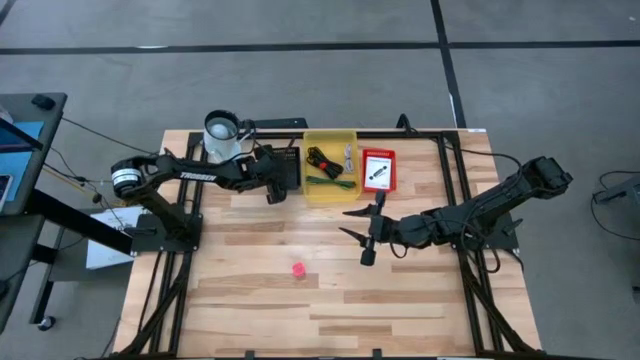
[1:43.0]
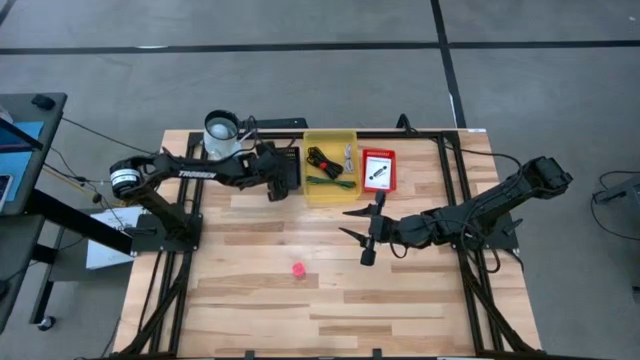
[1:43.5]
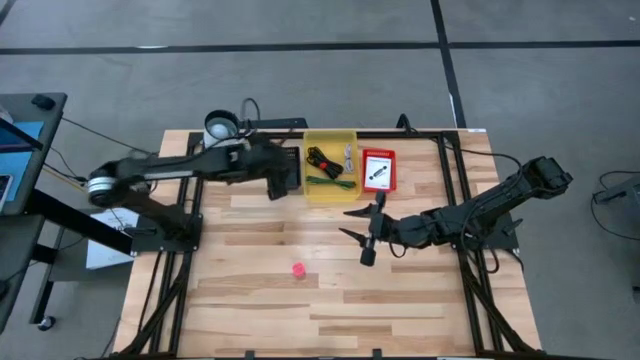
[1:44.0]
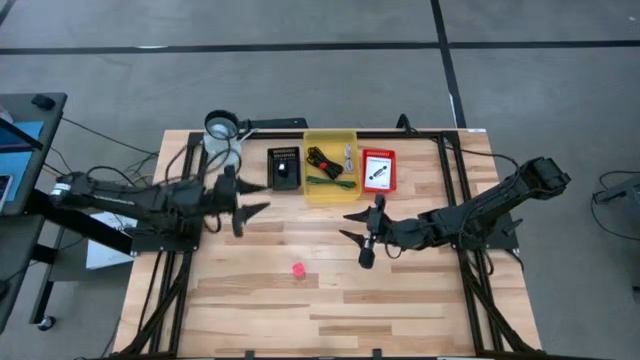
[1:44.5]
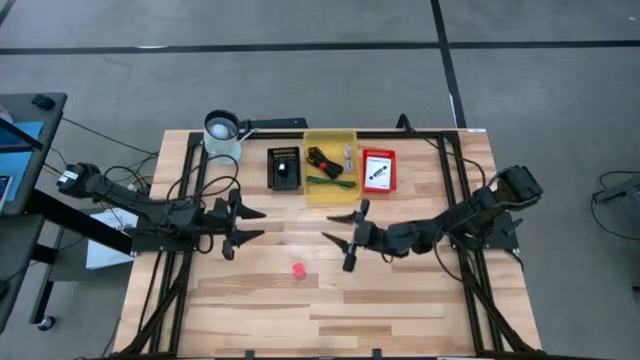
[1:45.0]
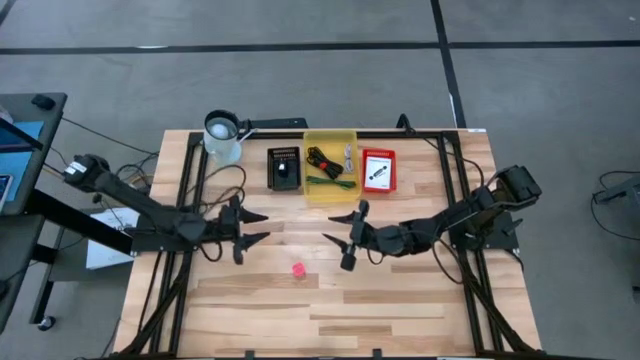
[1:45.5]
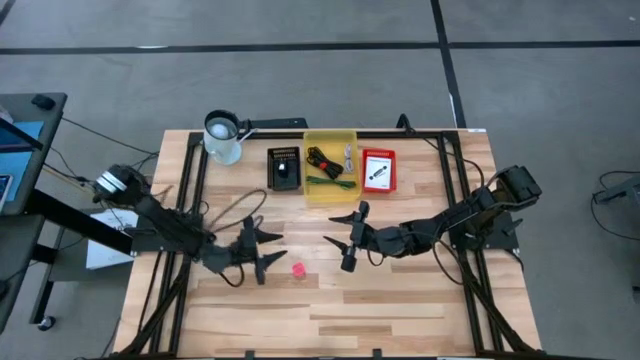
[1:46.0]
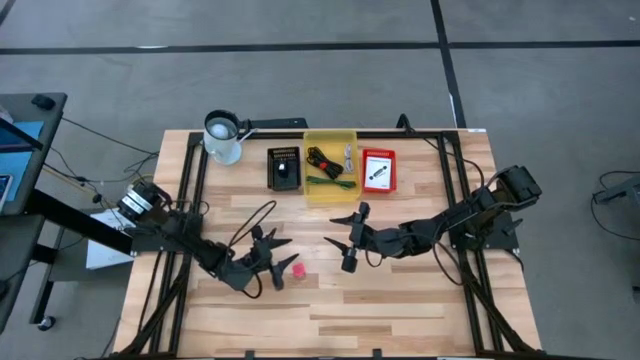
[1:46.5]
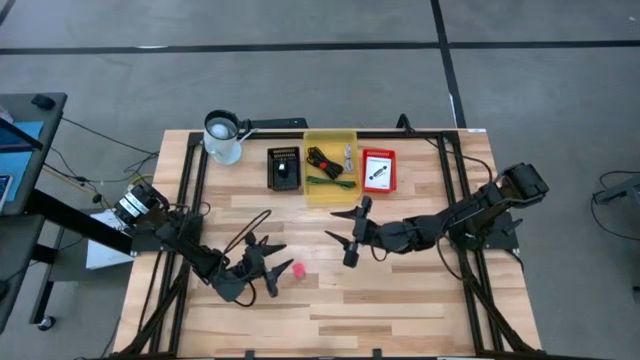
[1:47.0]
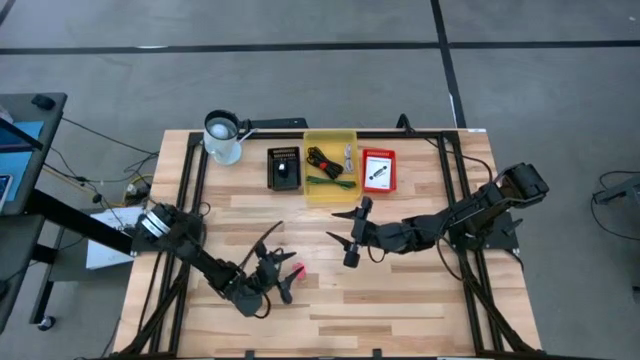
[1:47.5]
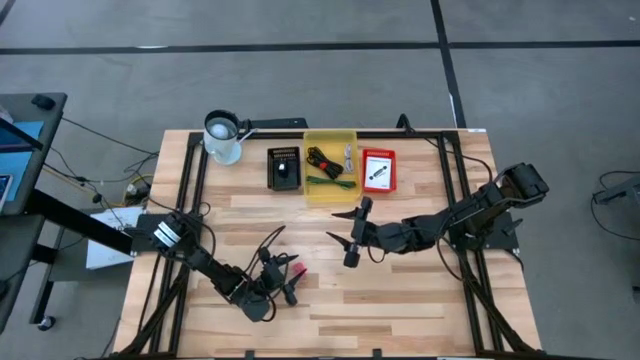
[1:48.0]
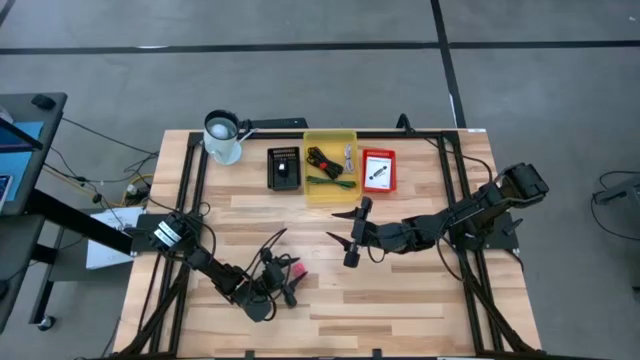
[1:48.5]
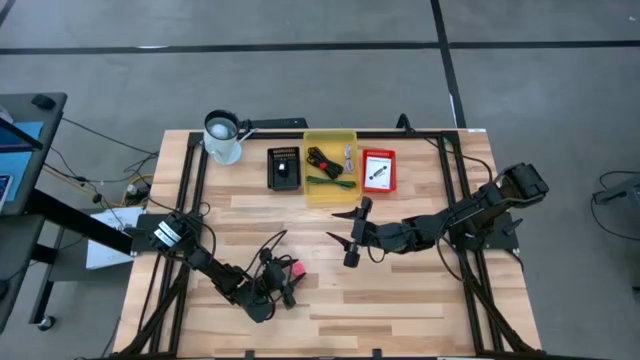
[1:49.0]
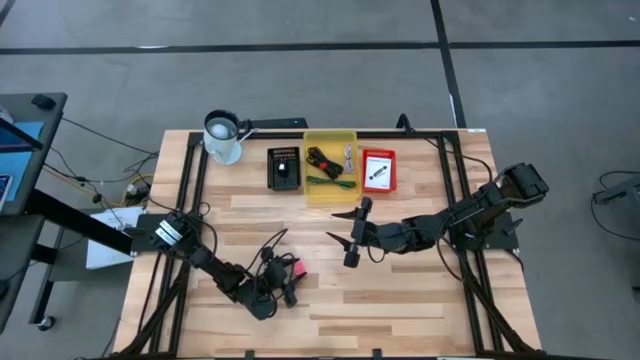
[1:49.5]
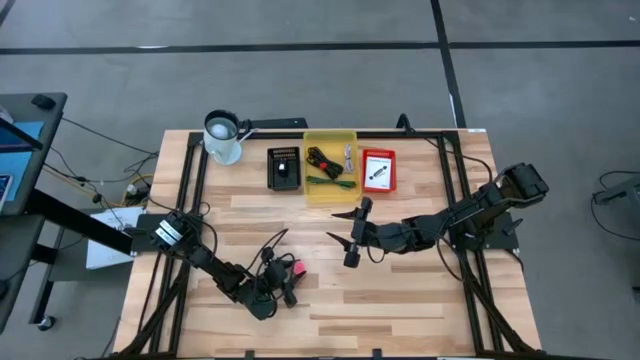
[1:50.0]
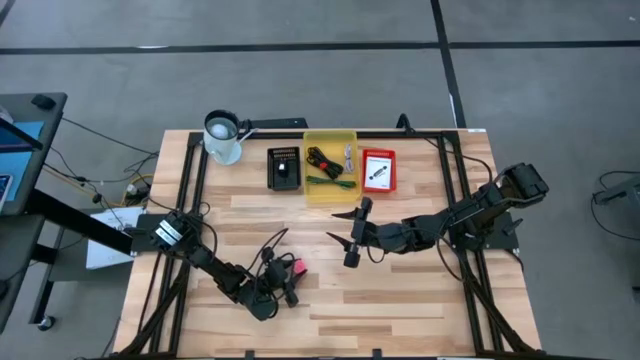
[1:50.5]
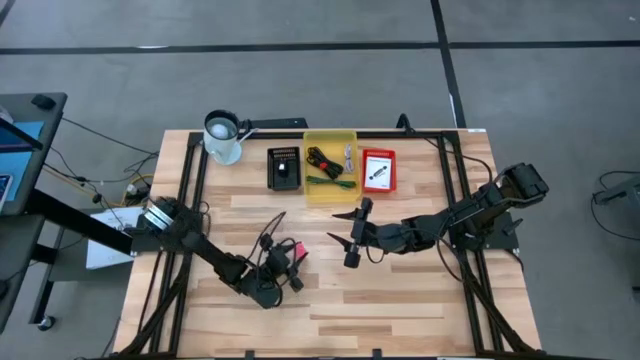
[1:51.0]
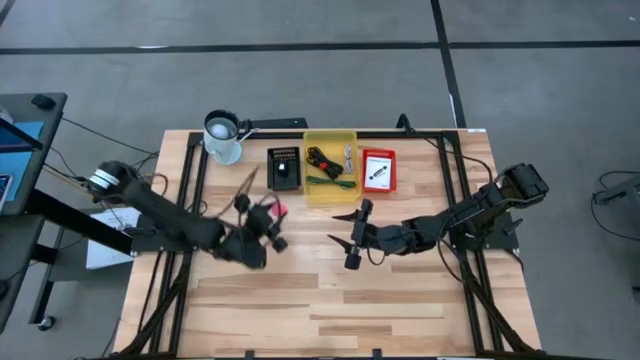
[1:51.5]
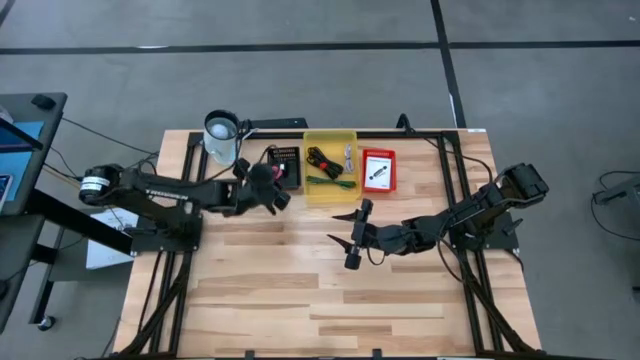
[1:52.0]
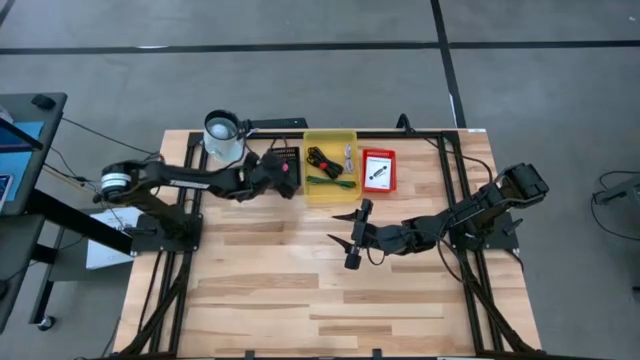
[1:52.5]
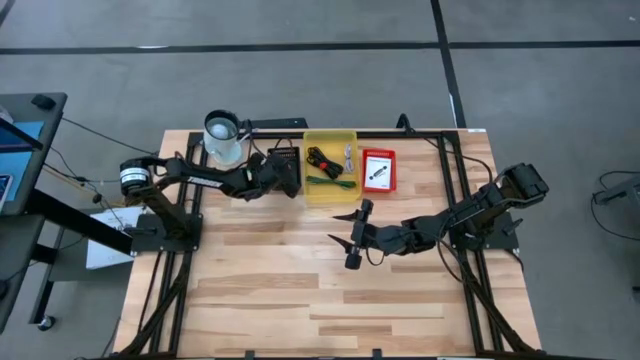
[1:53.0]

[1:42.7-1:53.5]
Task: Pick and place items into bin
Put the pink charger adapter into the black bin

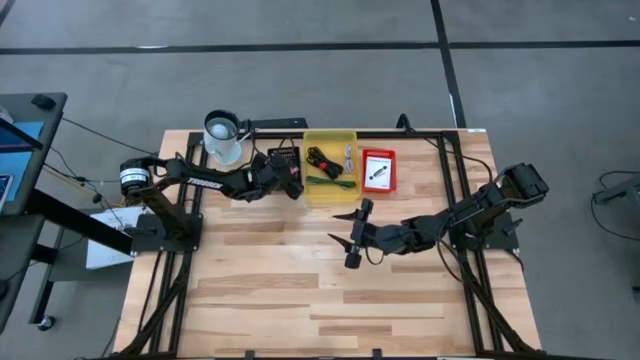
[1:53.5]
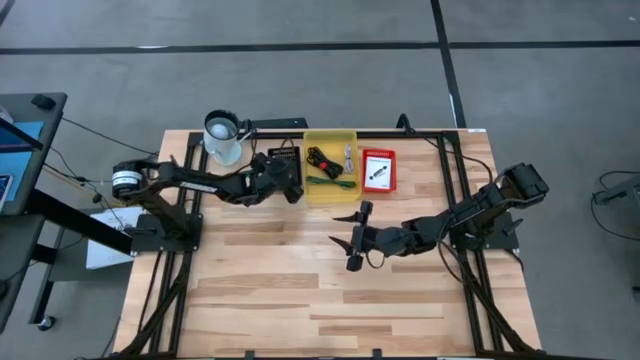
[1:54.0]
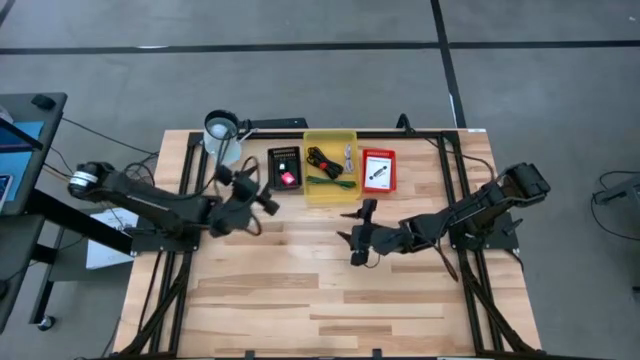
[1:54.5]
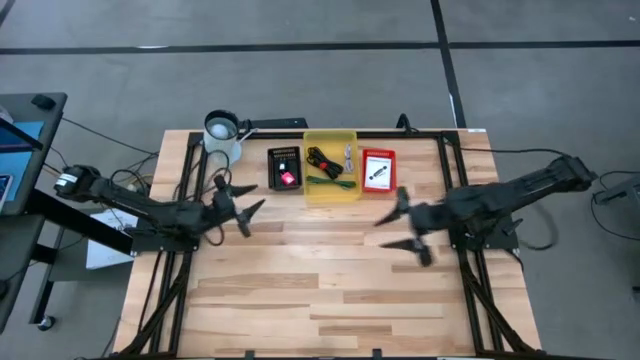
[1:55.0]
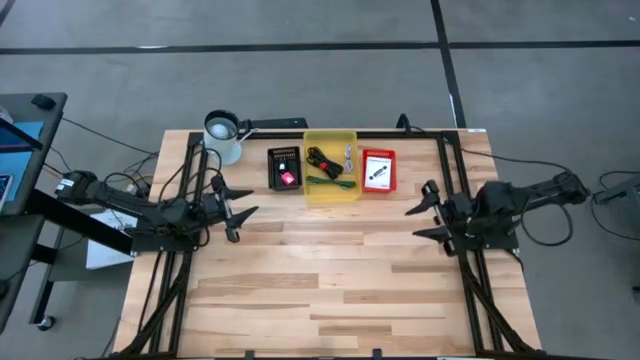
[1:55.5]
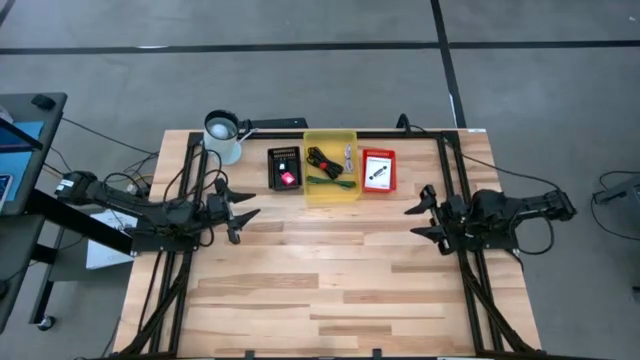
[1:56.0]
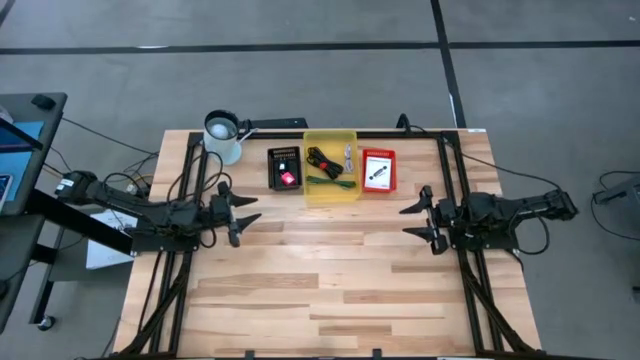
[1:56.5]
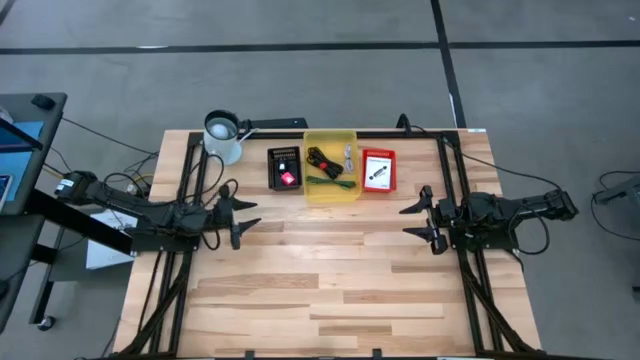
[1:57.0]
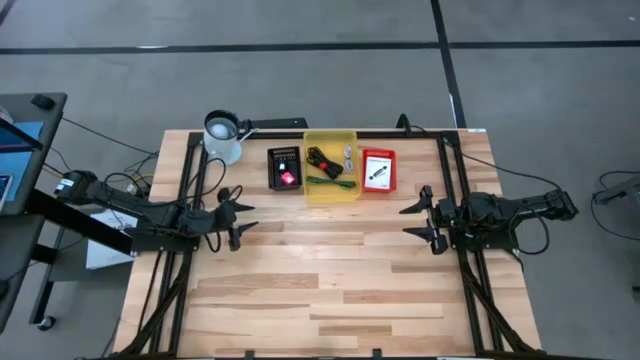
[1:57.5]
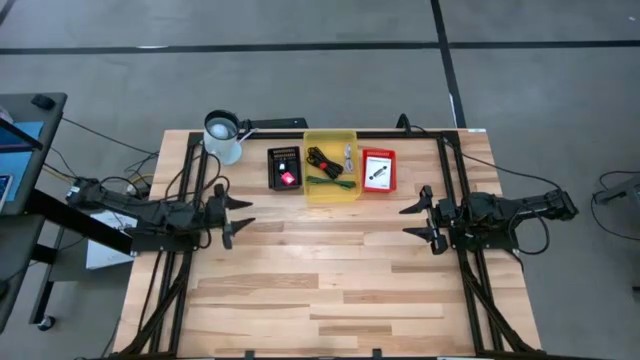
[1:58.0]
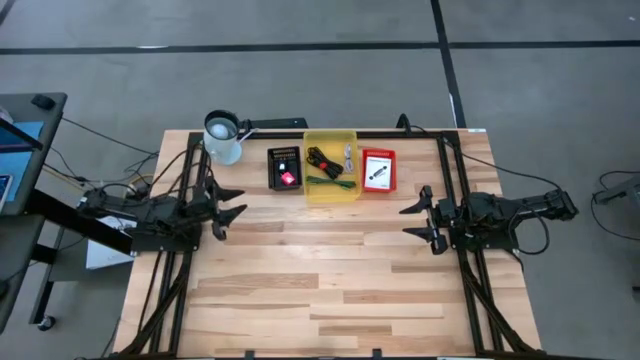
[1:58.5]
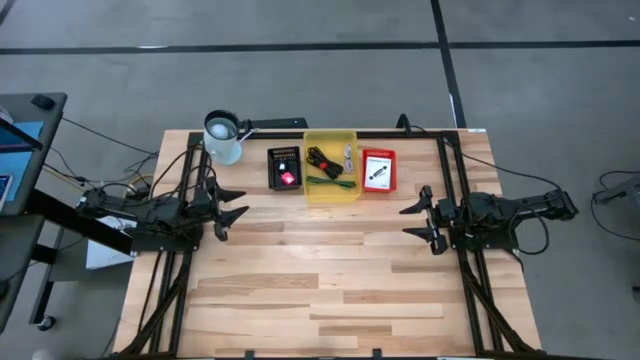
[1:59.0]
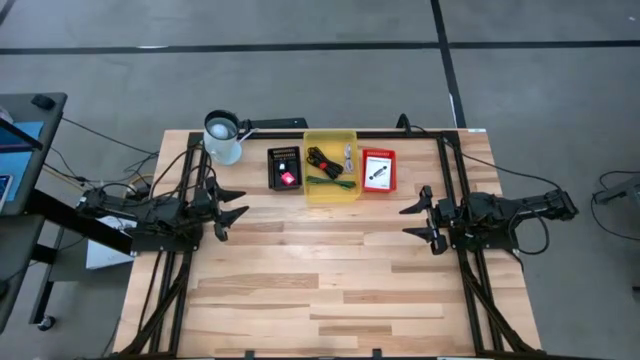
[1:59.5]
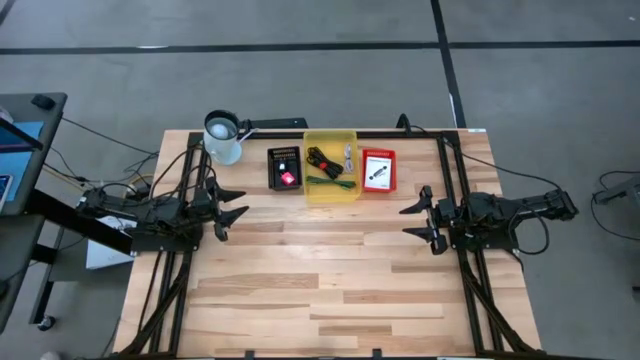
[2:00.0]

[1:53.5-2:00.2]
Return to Home Position

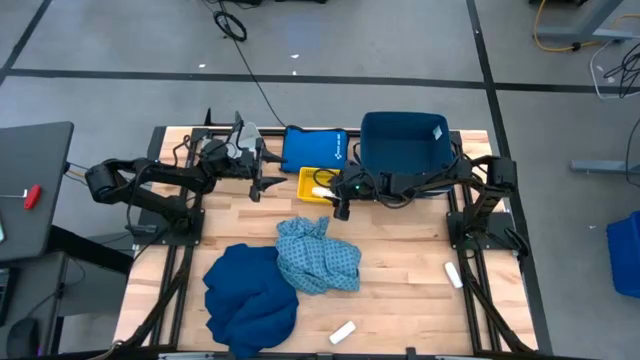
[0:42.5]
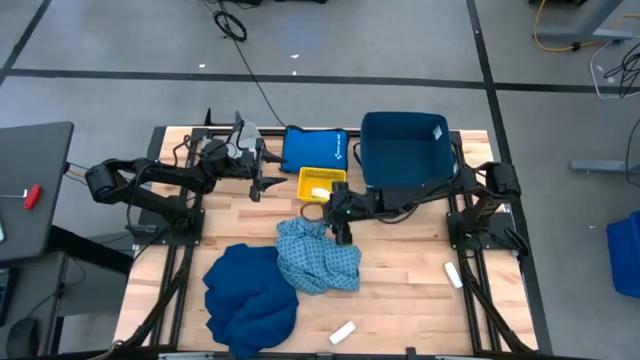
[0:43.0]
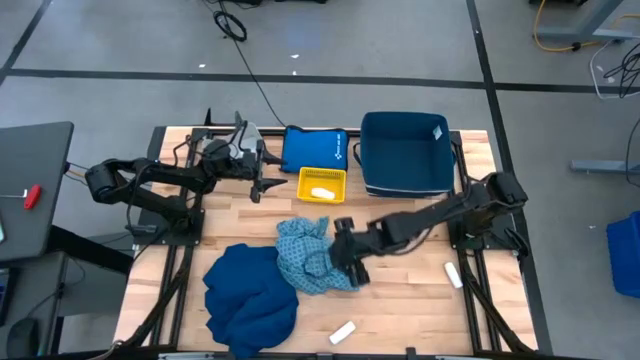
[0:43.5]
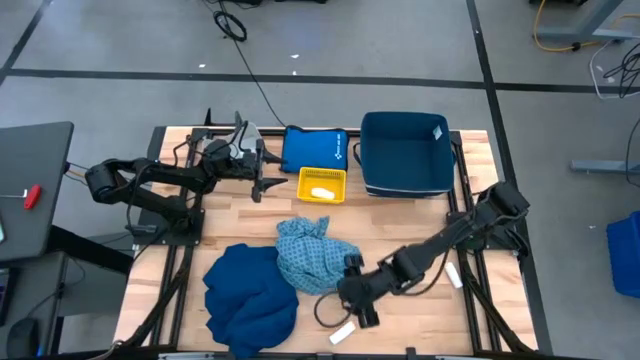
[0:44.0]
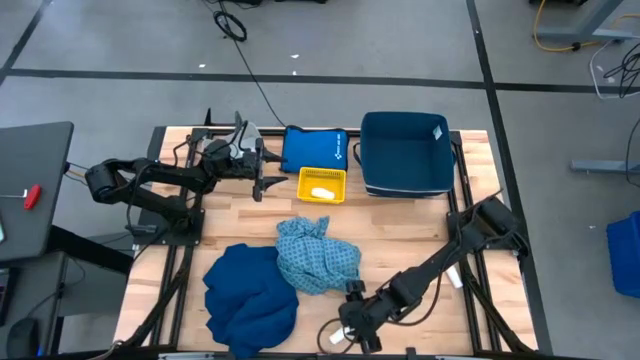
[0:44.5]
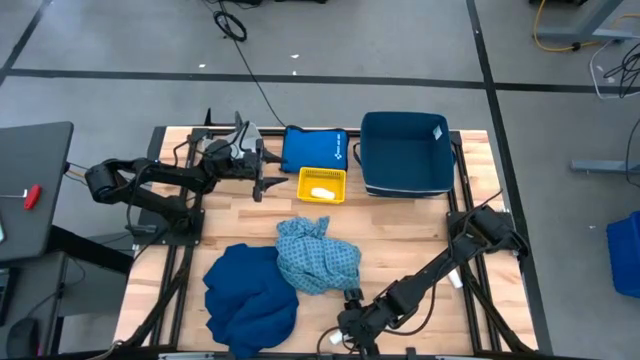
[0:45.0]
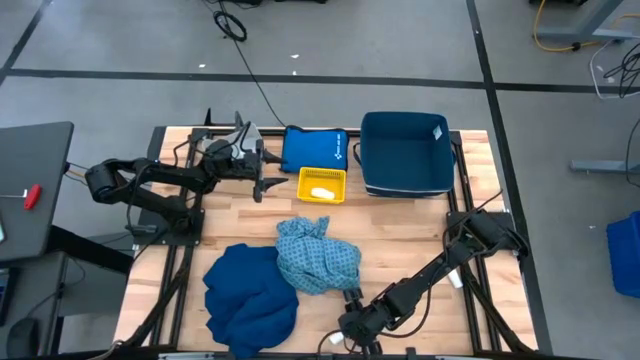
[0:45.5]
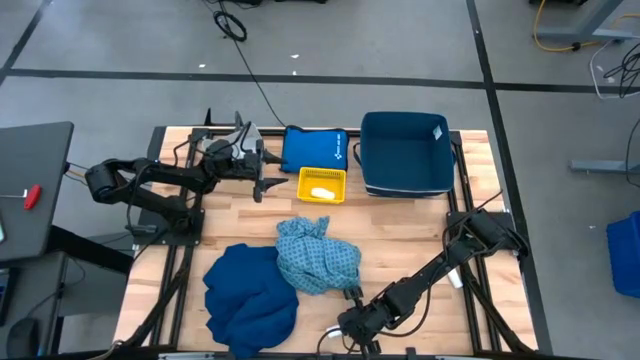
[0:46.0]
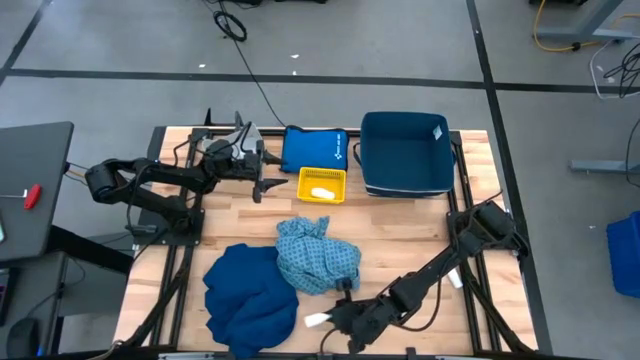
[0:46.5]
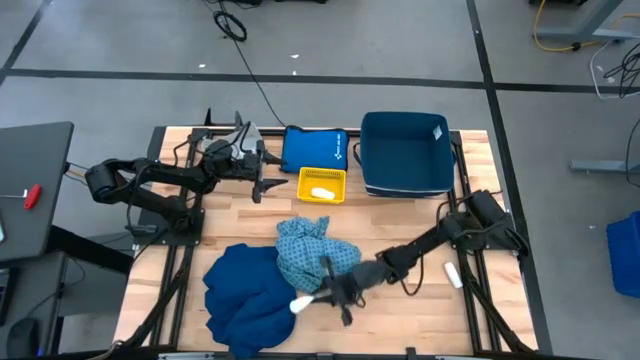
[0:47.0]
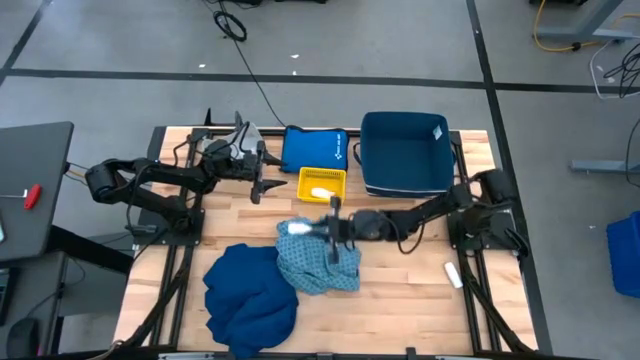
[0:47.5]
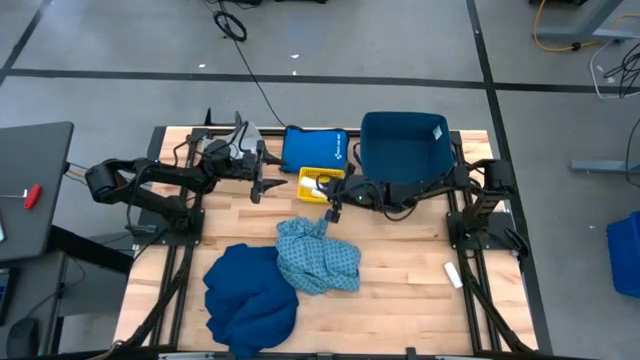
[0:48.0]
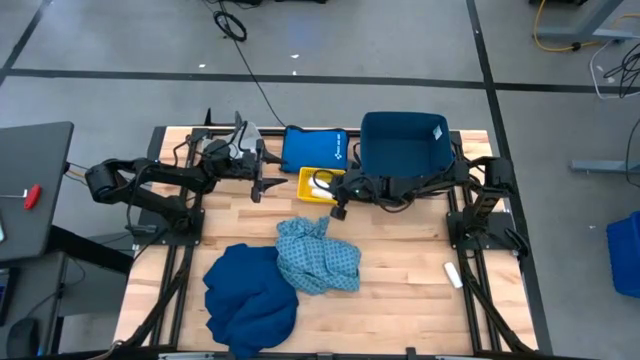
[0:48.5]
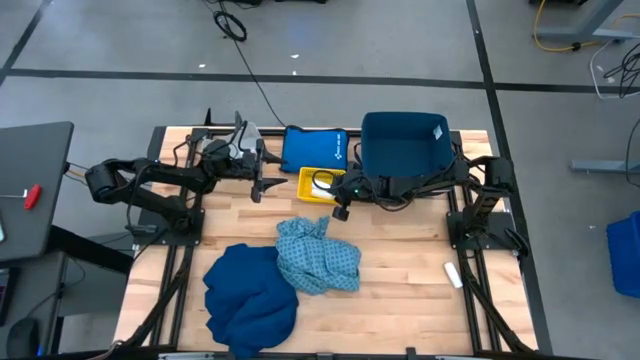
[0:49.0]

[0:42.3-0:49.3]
Task: Pick & place medical supplies in basket/bin
Put the bottom white rolled gauze into the yellow bin
